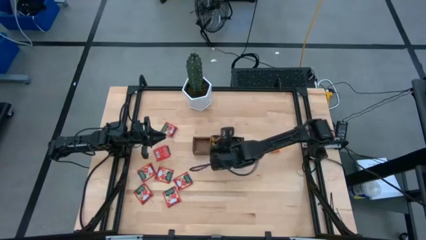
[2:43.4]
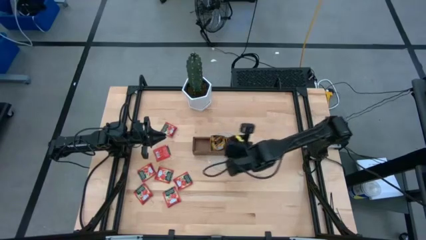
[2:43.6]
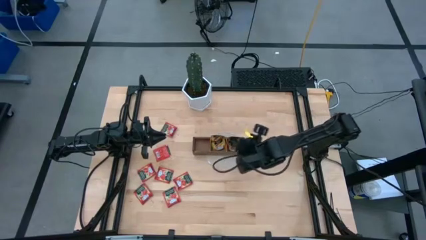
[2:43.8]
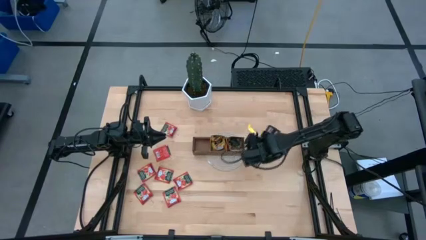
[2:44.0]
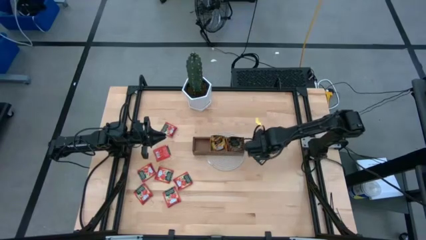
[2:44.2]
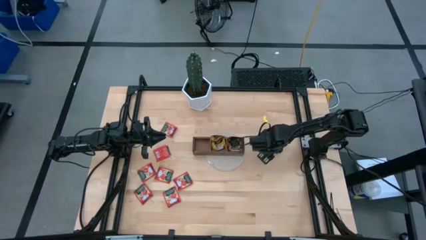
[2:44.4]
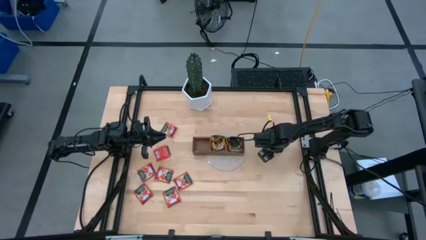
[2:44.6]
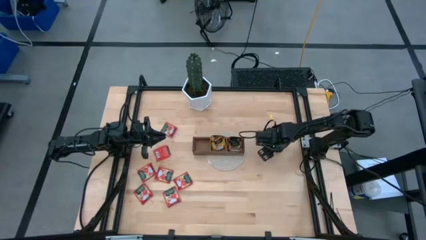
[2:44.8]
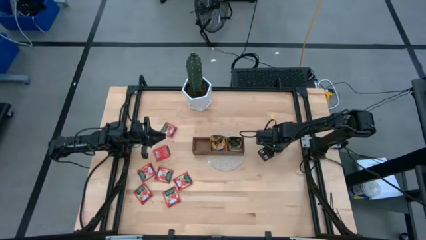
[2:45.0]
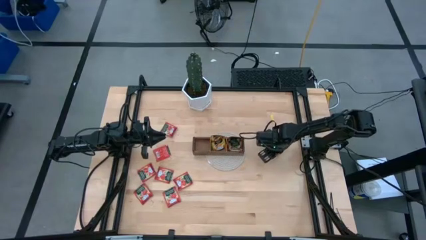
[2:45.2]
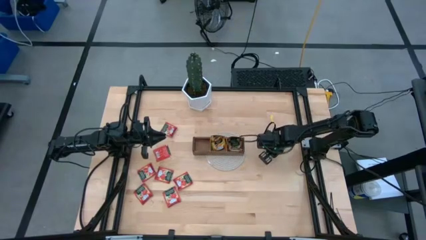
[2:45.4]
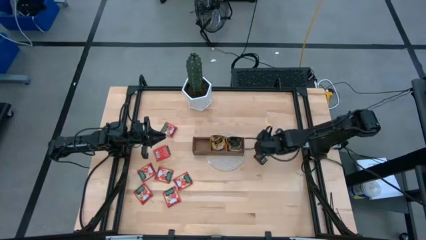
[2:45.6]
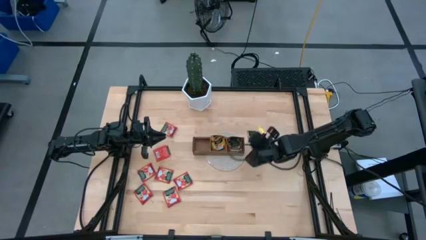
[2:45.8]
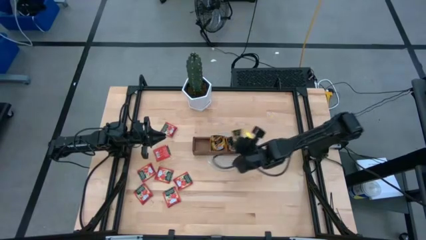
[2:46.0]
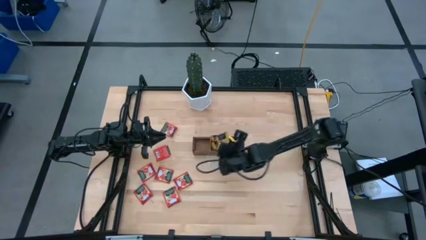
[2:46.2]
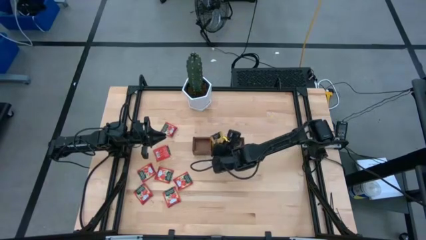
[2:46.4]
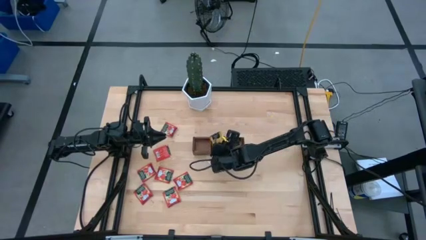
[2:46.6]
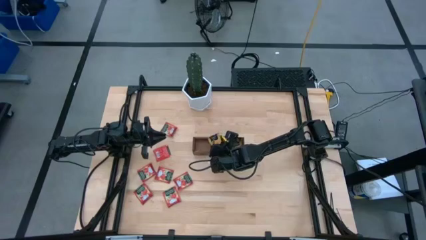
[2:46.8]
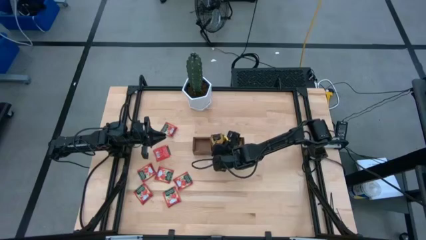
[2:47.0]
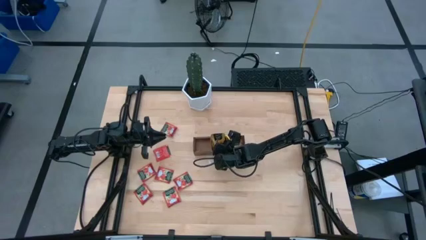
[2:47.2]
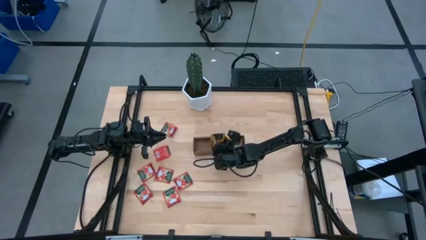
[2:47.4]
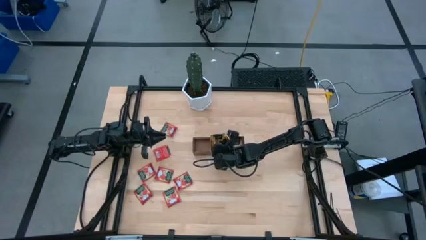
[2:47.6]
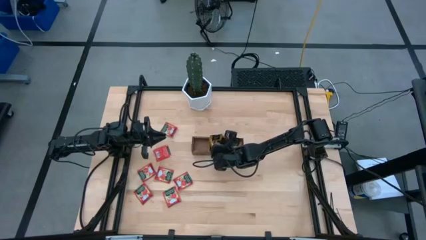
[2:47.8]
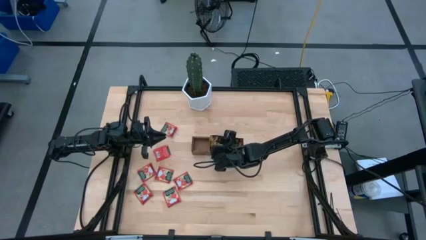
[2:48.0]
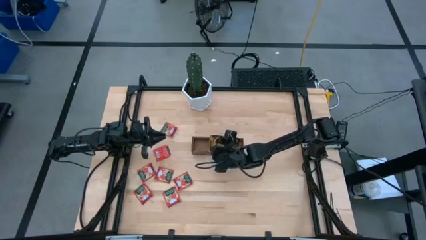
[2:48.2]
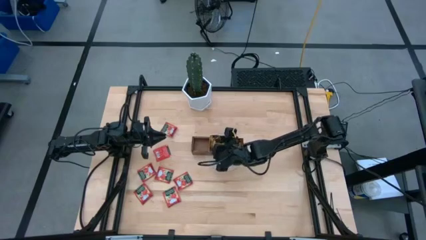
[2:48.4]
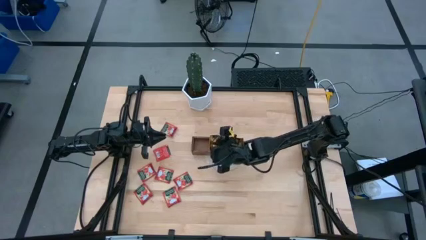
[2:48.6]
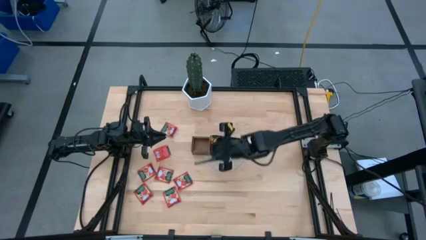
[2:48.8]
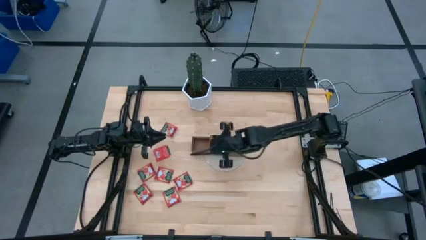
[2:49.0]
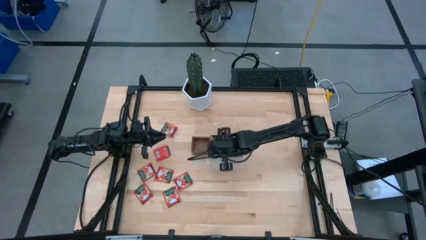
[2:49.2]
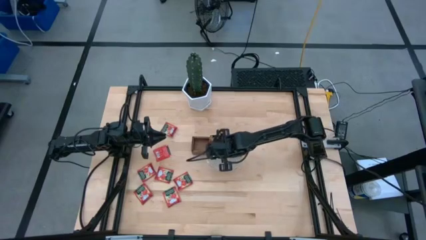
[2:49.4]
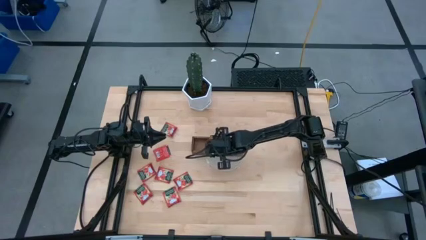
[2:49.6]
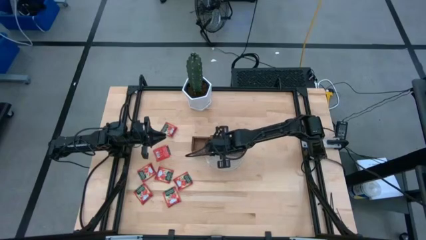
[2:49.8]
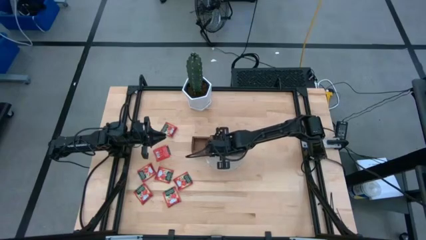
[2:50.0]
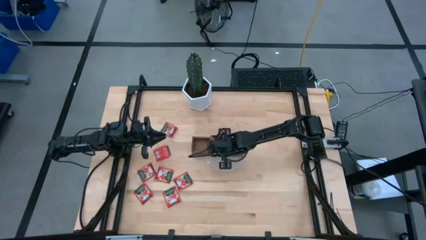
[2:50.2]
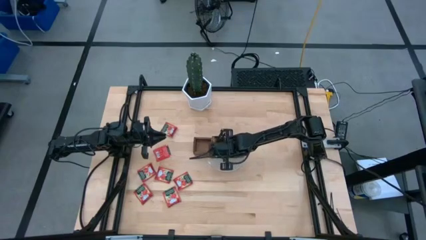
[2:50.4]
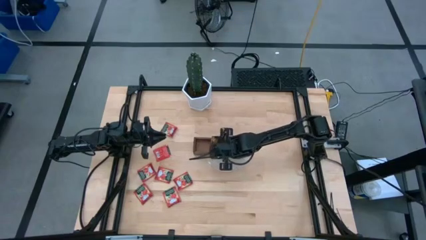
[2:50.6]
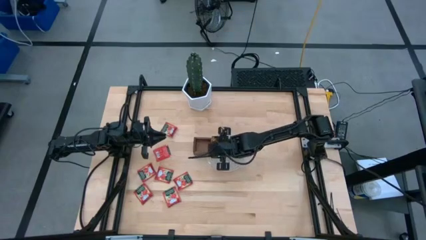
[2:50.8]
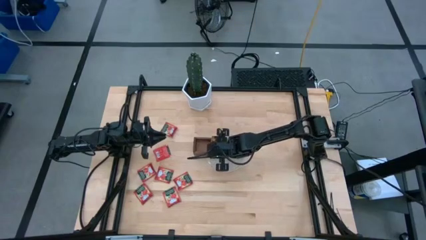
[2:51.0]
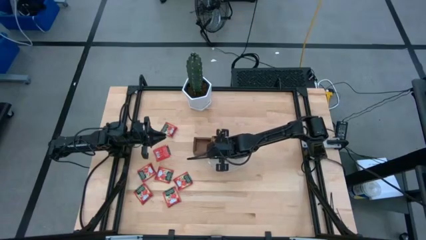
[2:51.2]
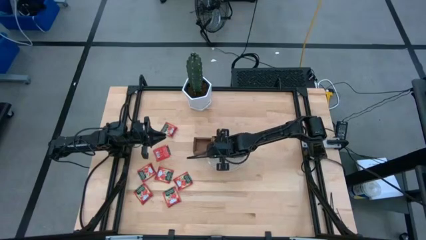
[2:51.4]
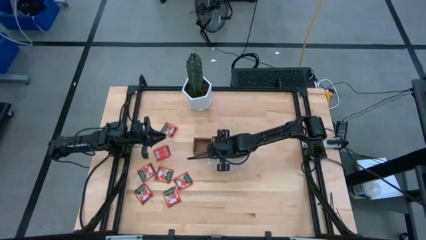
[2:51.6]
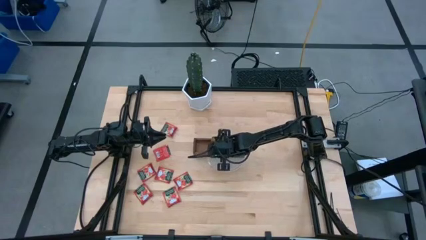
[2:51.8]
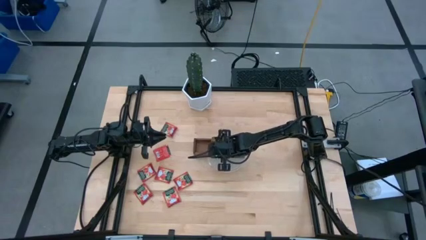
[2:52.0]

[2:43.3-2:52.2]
Task: Pick & Place Tea
Put the orange tea bag into the middle section of the wooden organizer

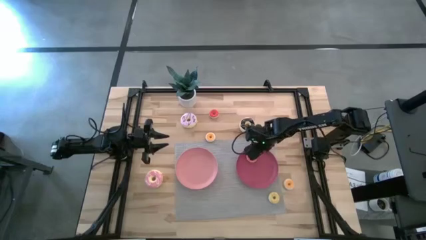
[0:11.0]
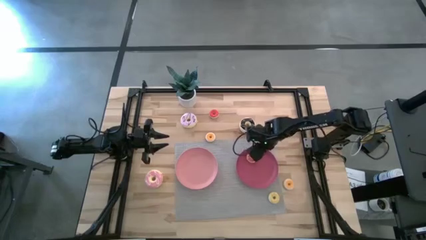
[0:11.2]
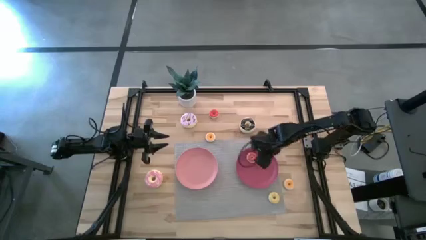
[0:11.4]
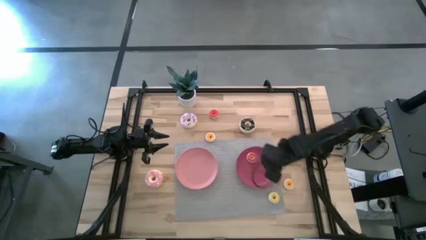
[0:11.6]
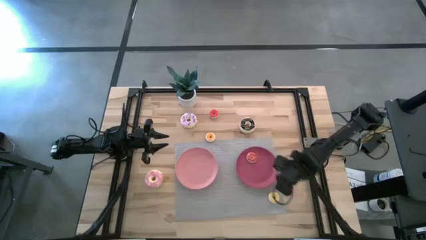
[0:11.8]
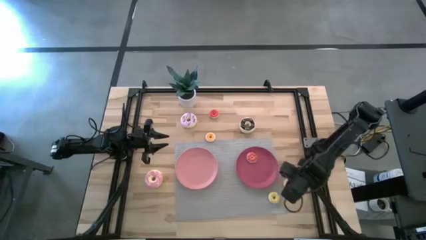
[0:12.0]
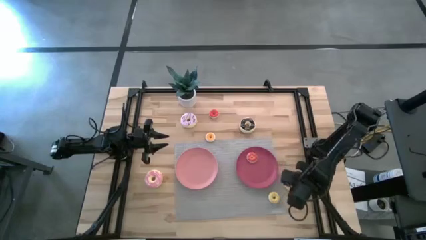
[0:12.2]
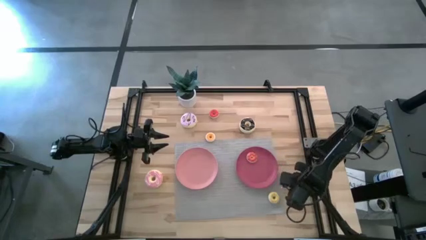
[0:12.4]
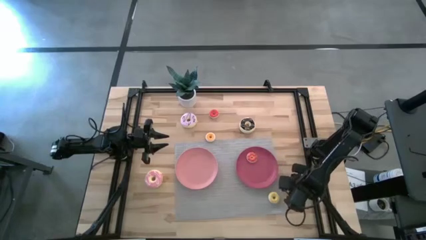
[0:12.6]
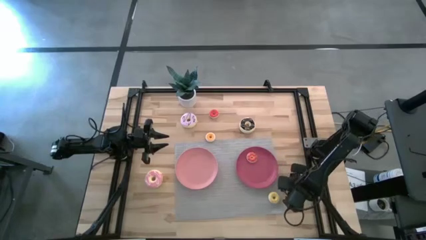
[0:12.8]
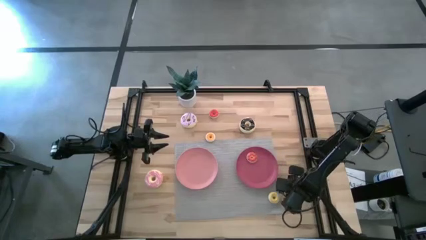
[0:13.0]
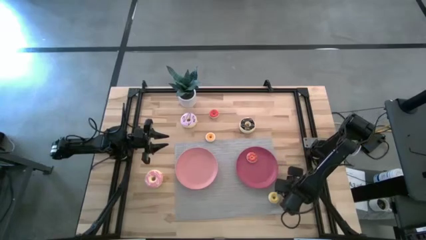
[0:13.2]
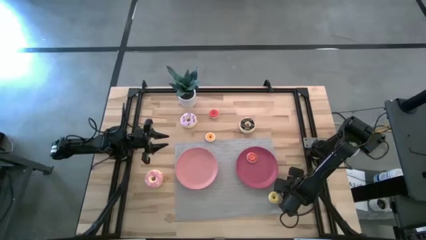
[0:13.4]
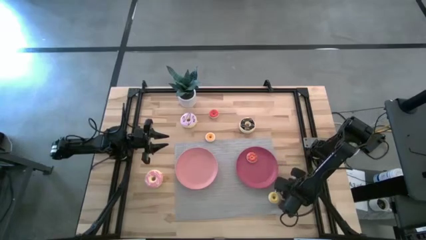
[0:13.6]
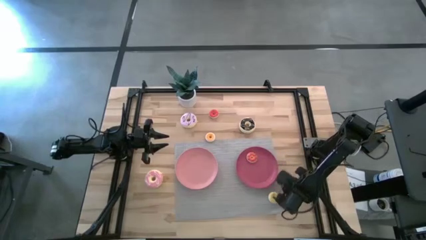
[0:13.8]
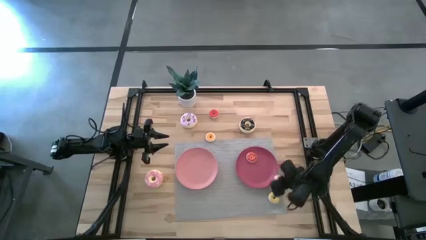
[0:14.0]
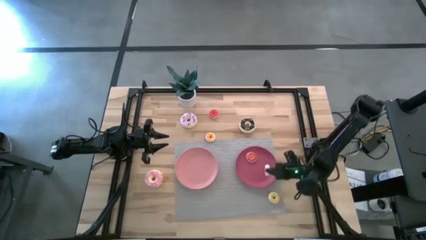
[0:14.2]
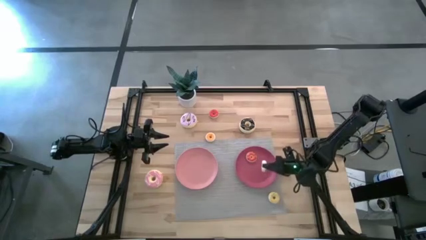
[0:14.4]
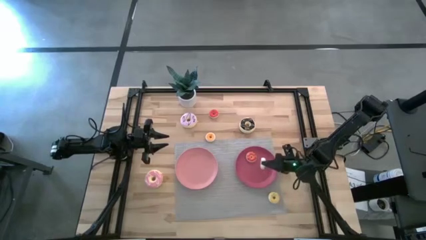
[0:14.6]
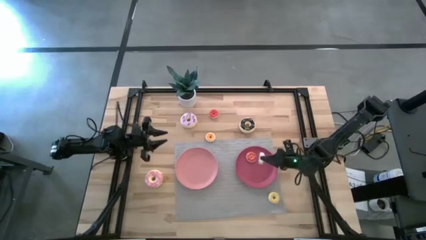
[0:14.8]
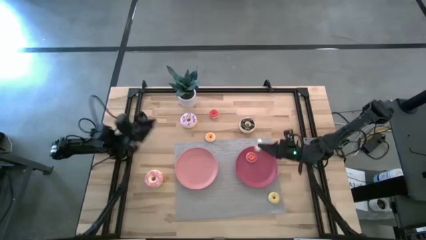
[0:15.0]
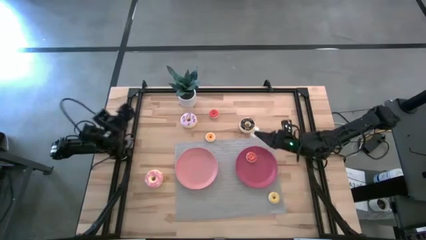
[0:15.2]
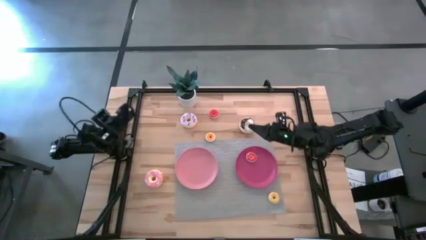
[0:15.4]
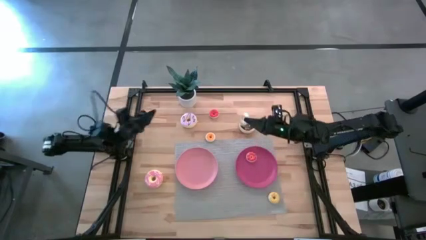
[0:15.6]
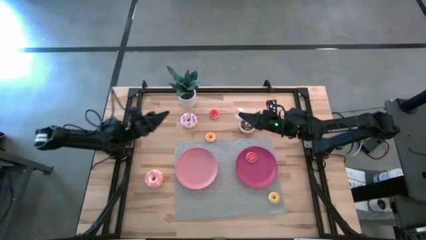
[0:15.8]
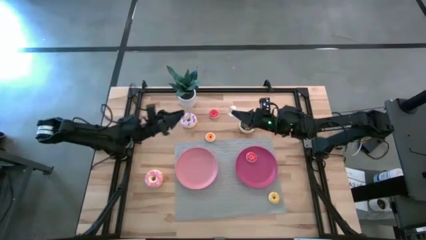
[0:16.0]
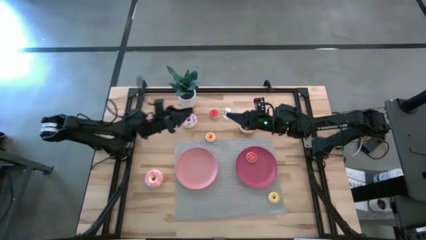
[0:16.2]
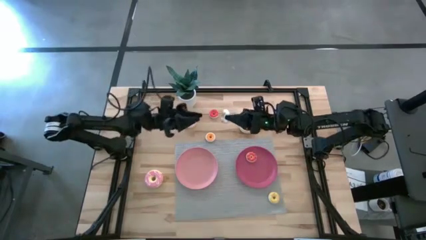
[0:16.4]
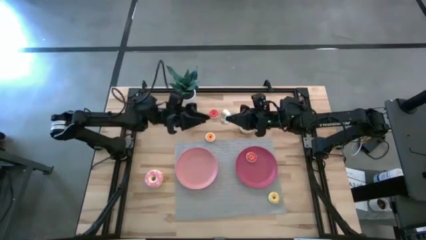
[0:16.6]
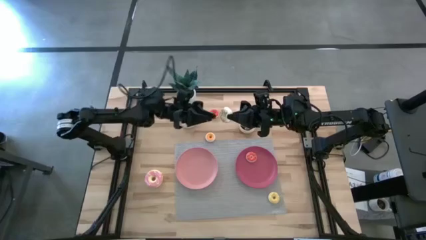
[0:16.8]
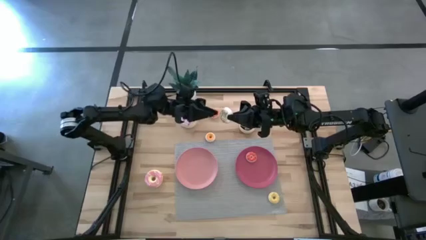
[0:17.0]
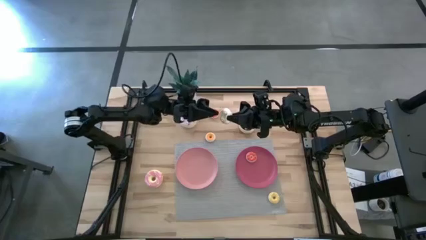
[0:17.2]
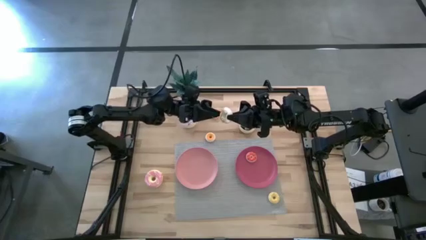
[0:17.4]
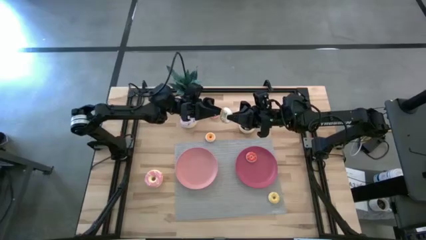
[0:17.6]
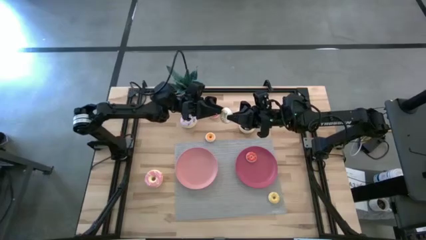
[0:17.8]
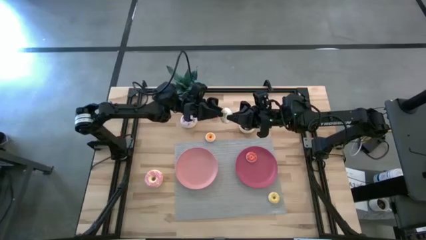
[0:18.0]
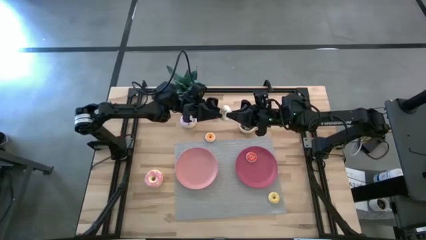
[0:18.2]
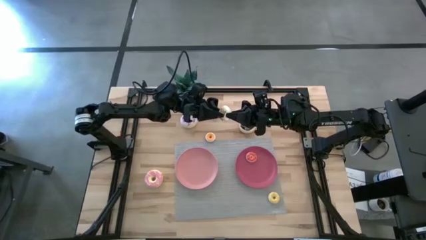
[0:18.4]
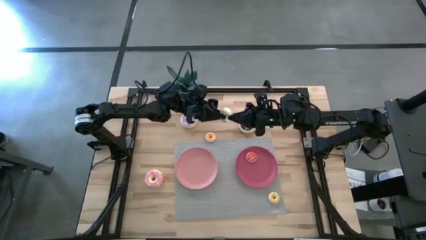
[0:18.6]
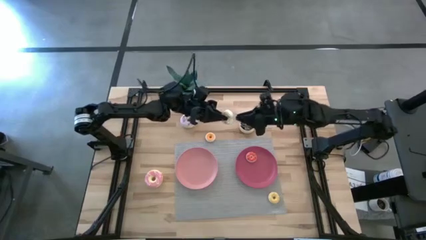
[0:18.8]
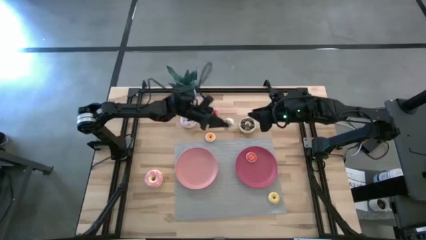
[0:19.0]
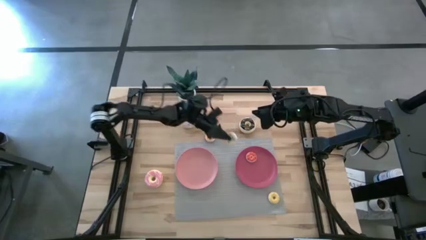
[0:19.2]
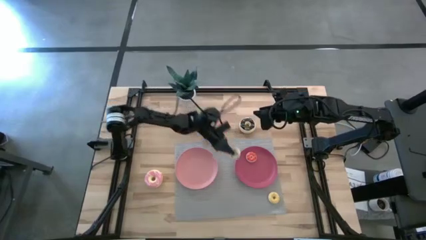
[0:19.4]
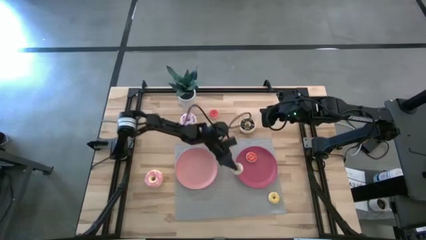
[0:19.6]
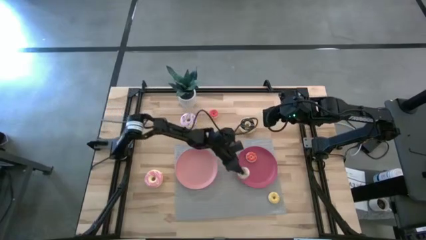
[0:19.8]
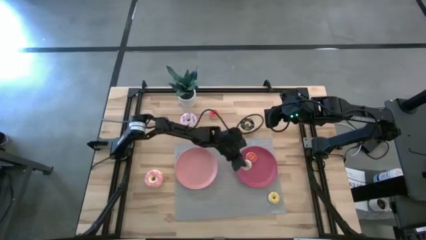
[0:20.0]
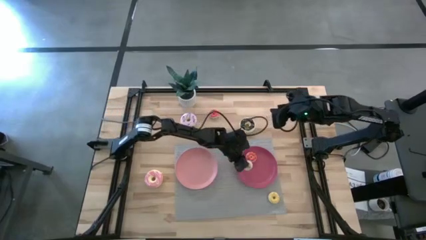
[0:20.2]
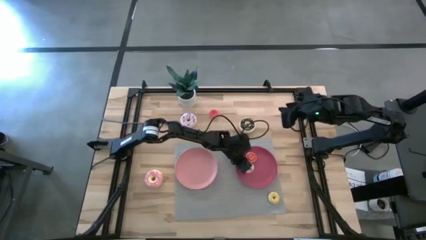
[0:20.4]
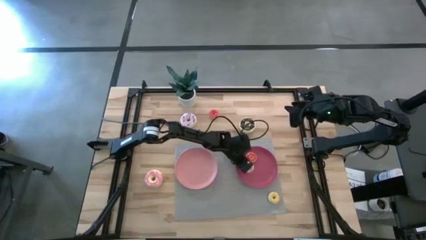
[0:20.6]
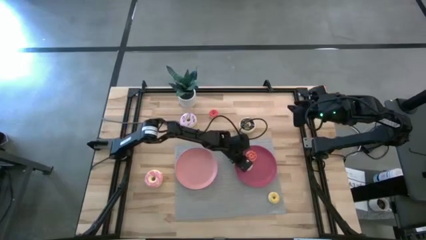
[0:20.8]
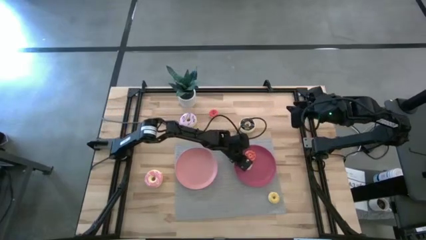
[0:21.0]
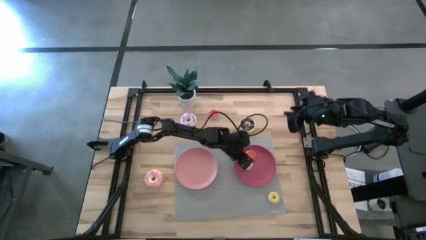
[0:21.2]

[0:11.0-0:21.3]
Task: Pick & Place donuts
Put the small white donut on the dark pink plate
